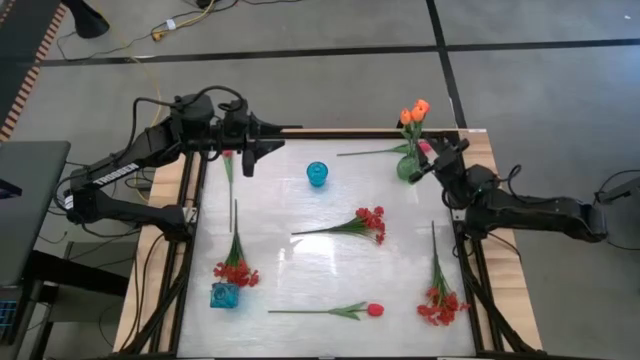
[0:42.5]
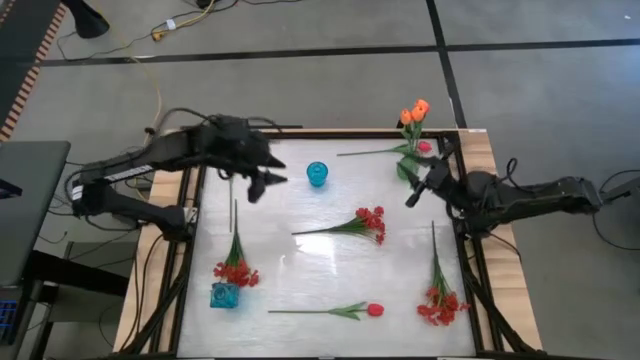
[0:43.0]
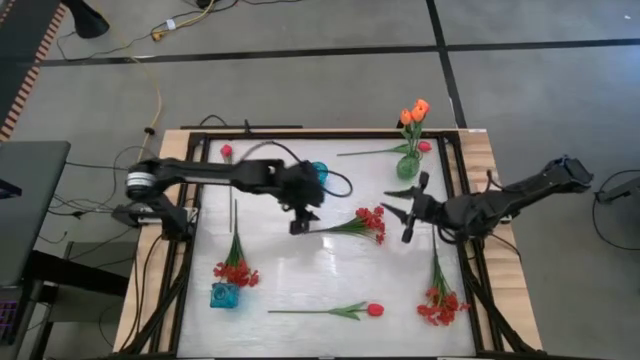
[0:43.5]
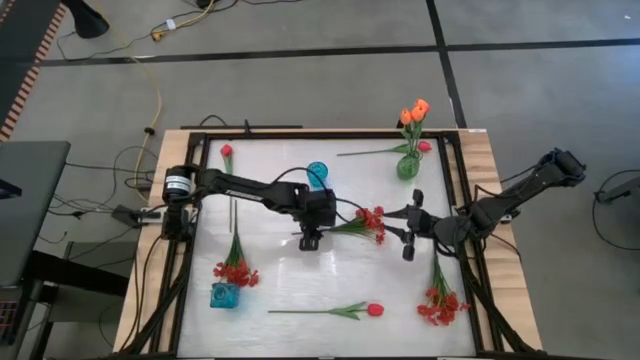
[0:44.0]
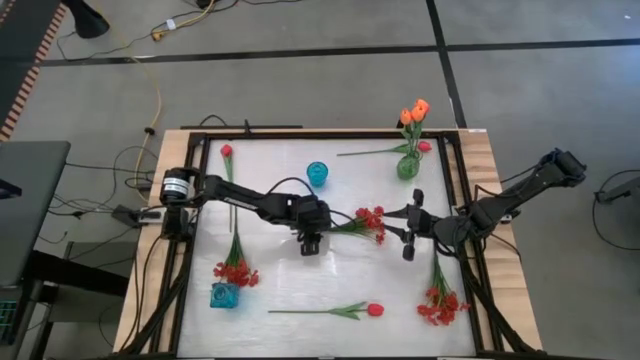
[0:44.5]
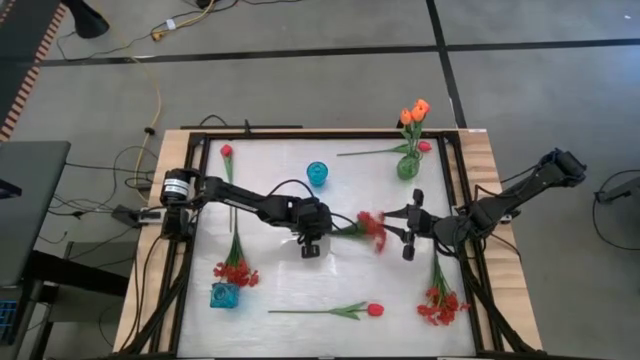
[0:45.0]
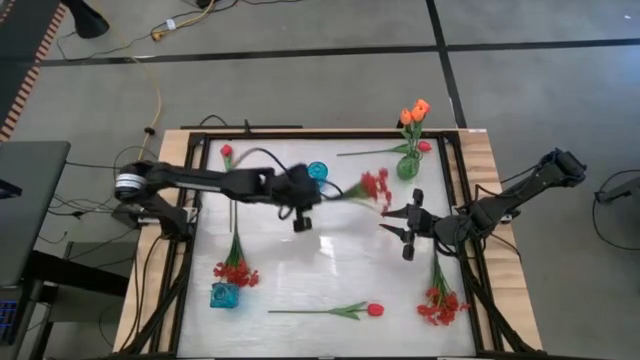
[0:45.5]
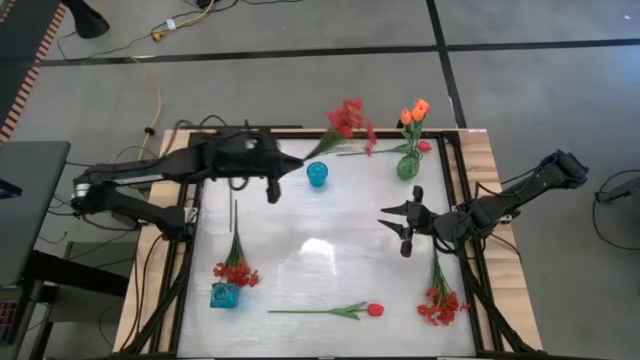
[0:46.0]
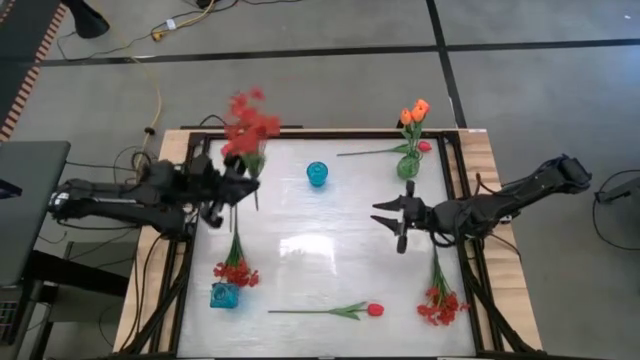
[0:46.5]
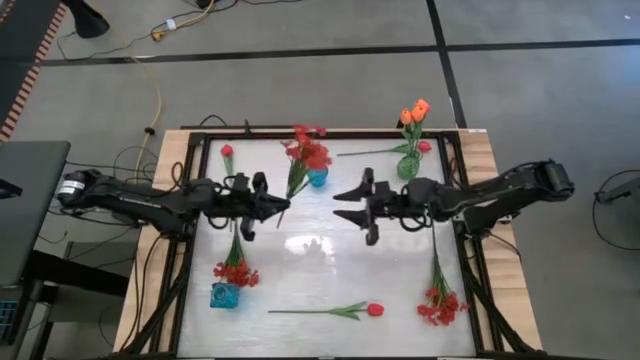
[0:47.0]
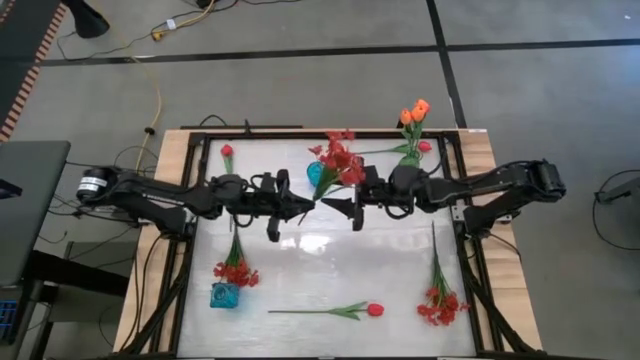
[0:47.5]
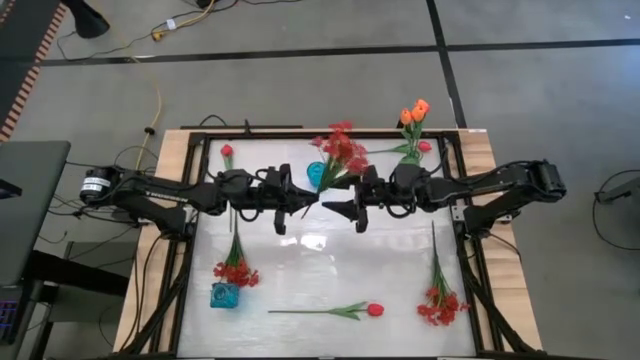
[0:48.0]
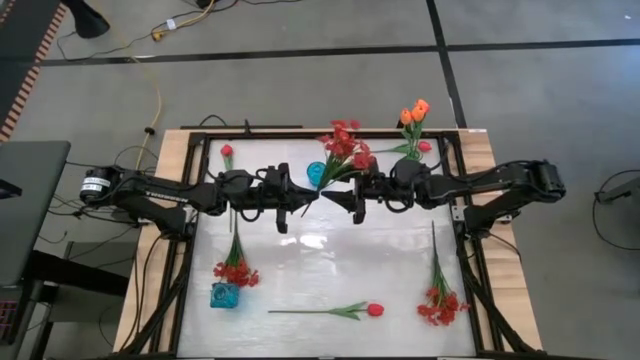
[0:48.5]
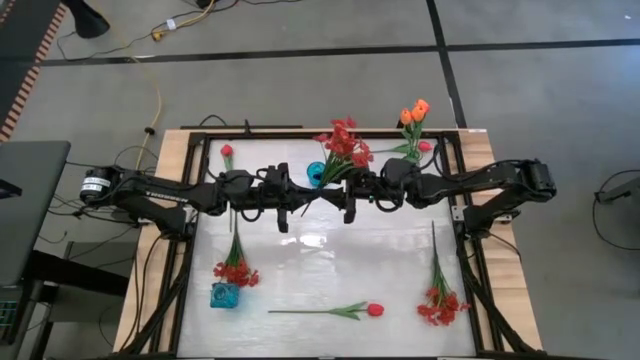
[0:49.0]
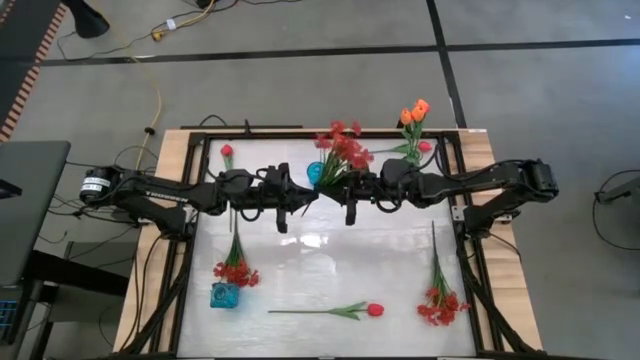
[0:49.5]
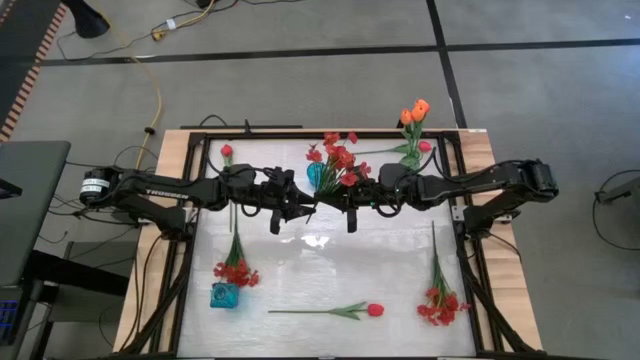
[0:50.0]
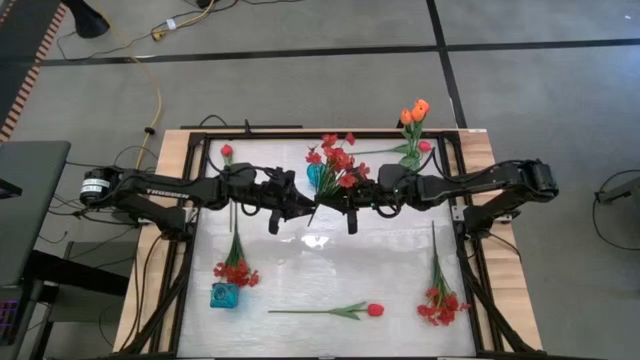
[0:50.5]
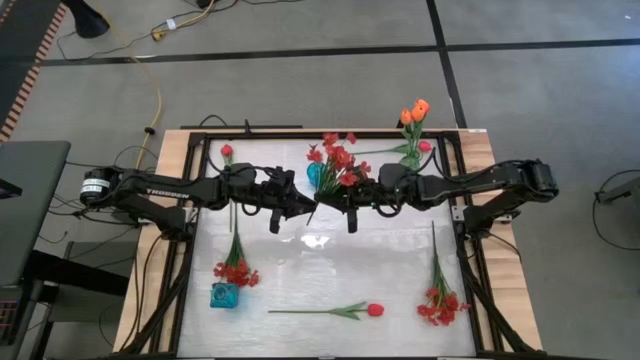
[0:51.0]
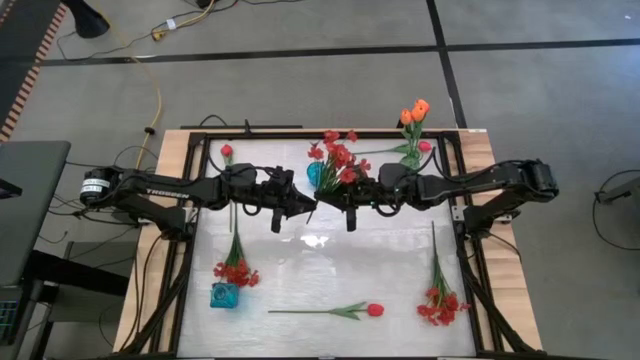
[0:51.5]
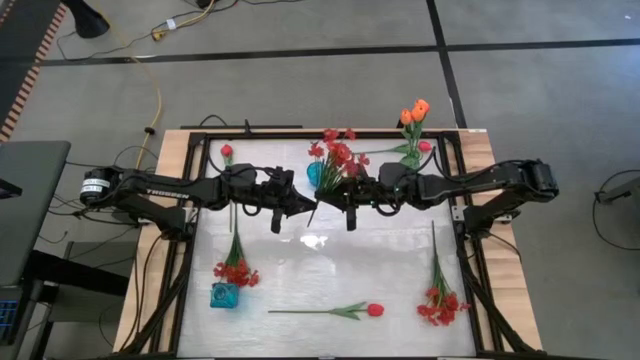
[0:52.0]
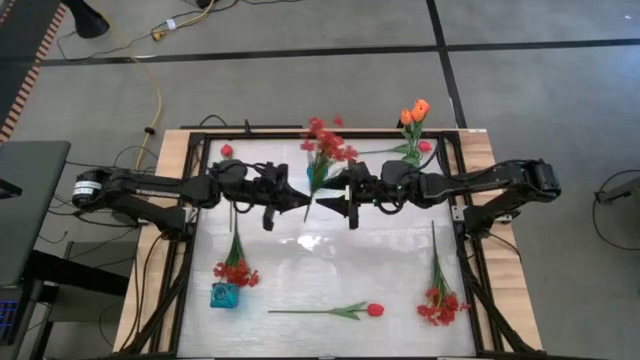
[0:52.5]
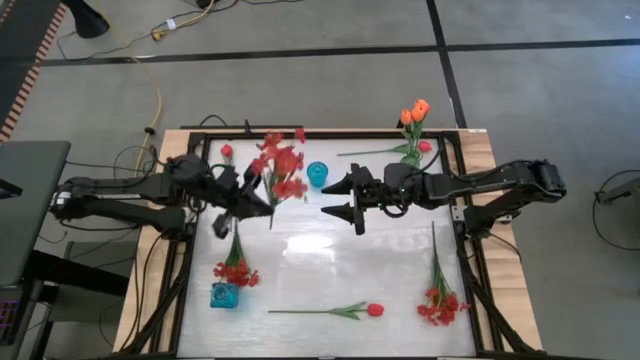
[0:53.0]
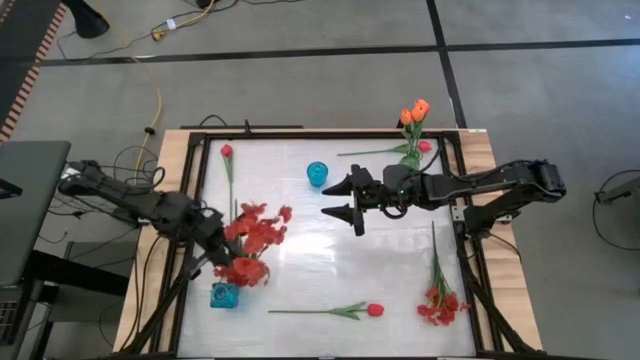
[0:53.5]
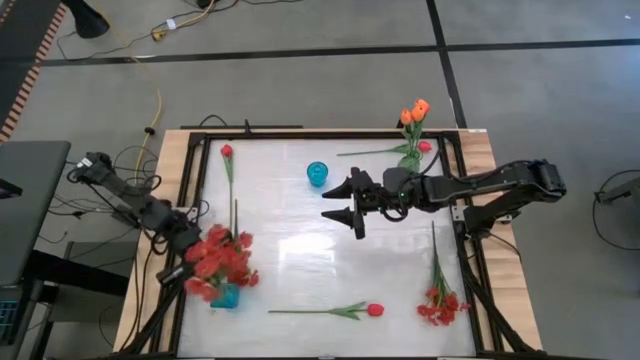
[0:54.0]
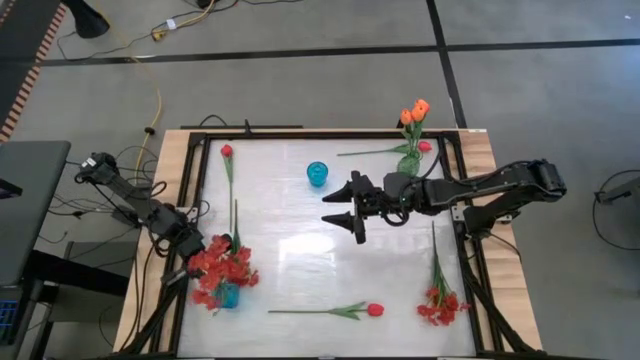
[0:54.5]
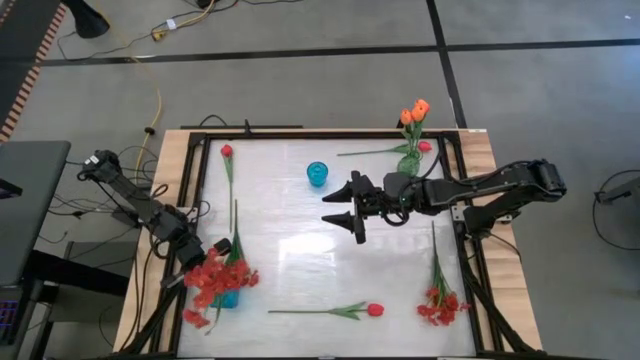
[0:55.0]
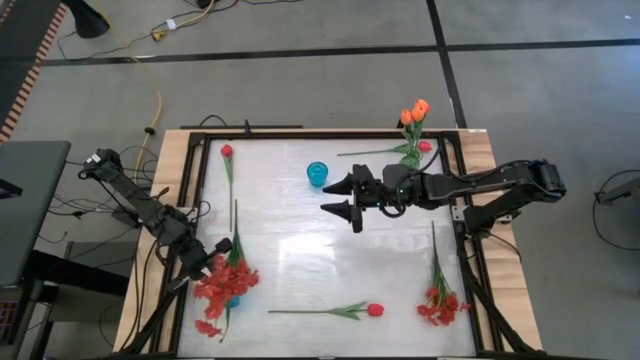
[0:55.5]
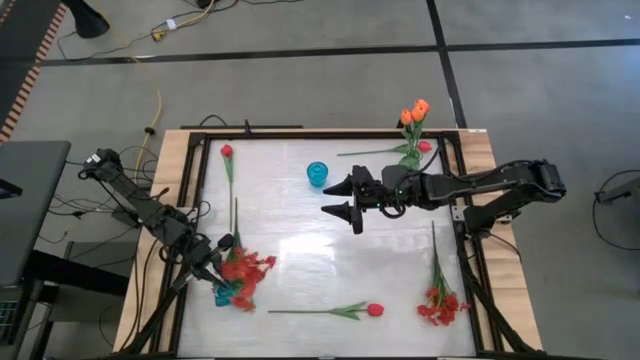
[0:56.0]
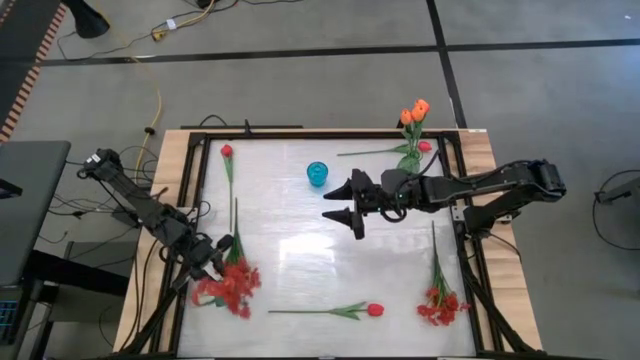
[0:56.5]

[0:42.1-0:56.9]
Task: Sort flowers into vase by color
Put the middle red flowers into the bottom blue vase

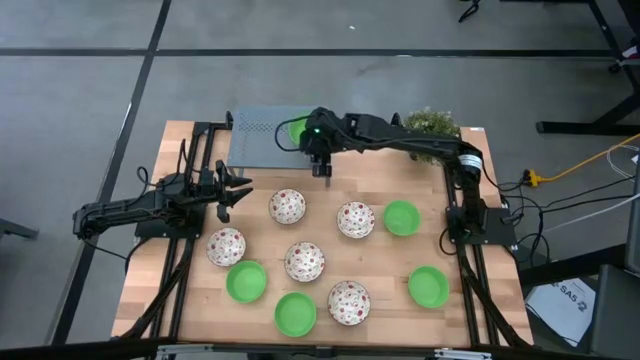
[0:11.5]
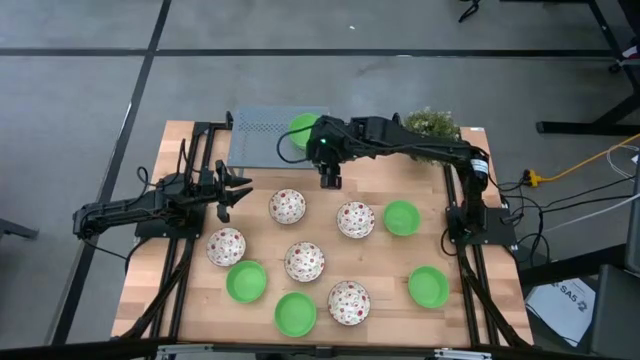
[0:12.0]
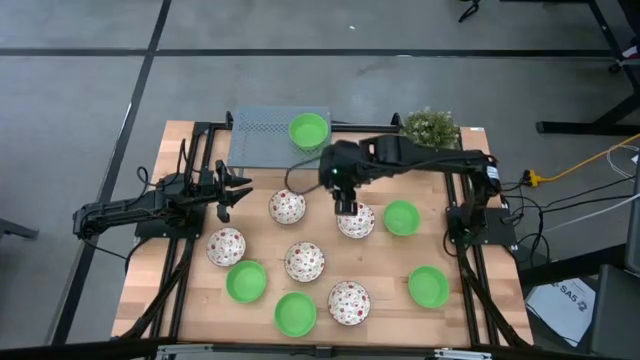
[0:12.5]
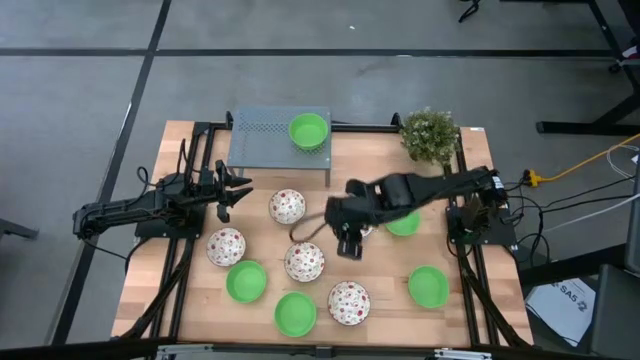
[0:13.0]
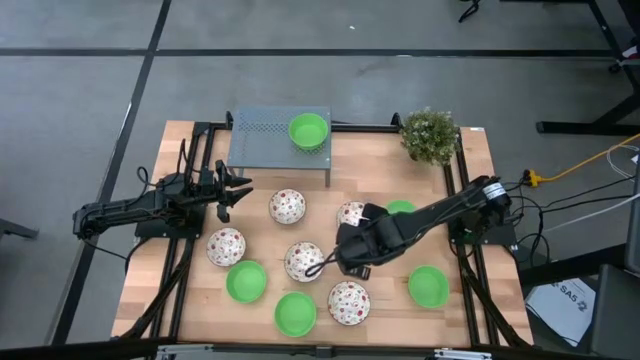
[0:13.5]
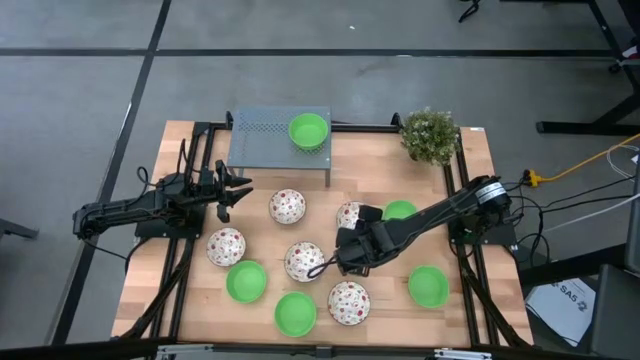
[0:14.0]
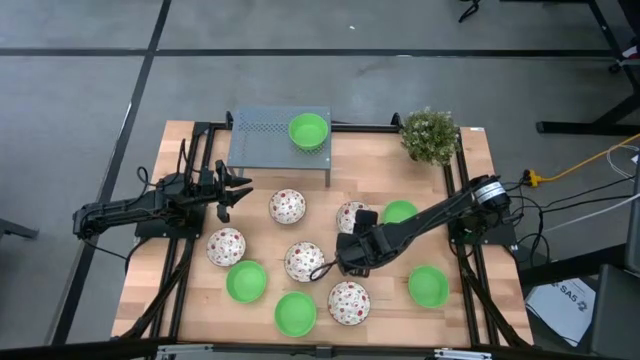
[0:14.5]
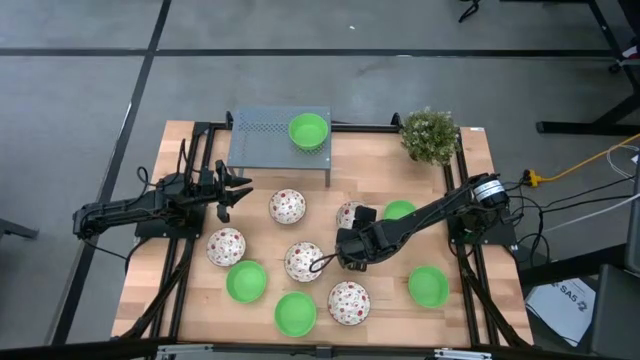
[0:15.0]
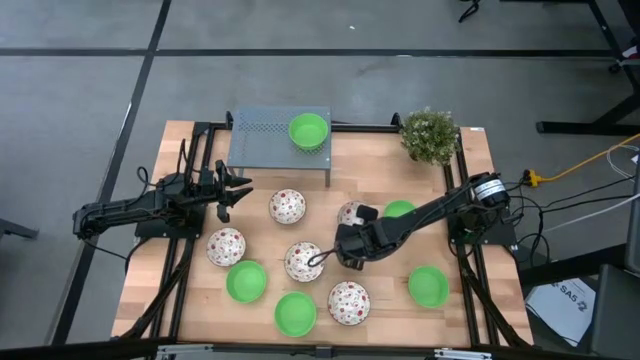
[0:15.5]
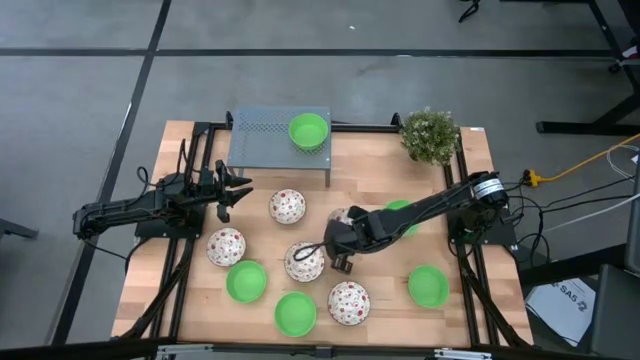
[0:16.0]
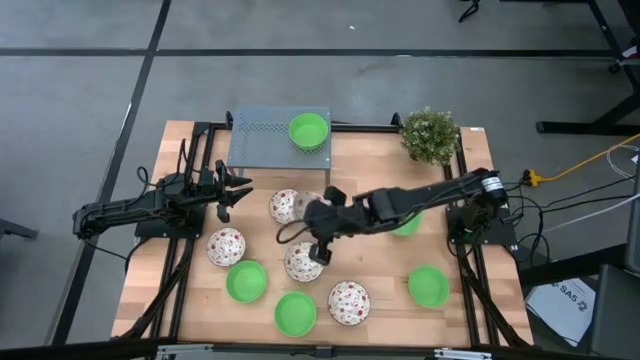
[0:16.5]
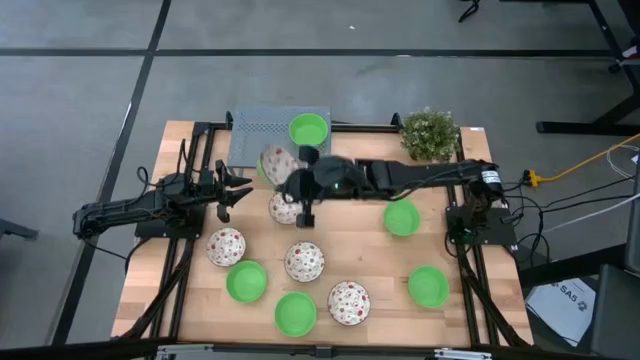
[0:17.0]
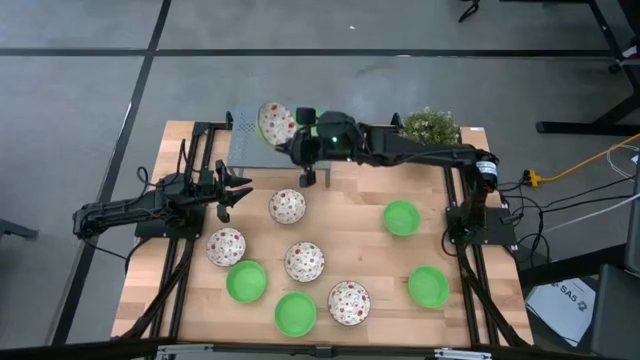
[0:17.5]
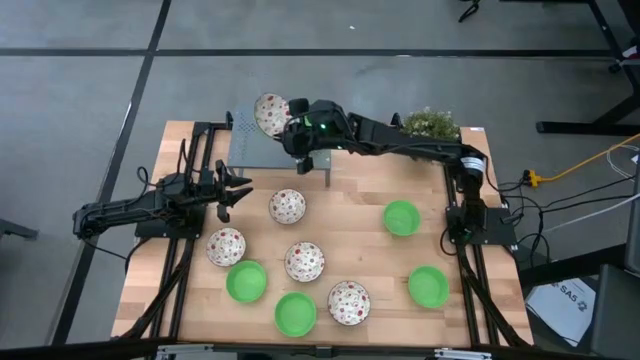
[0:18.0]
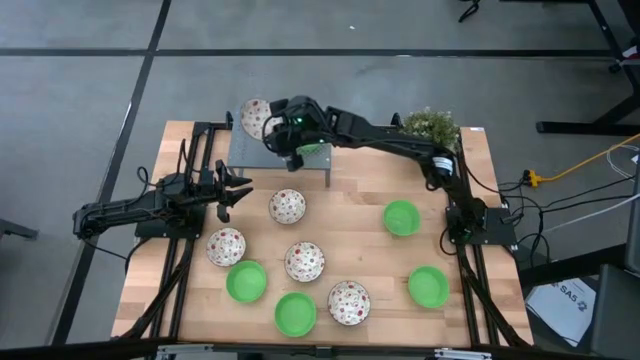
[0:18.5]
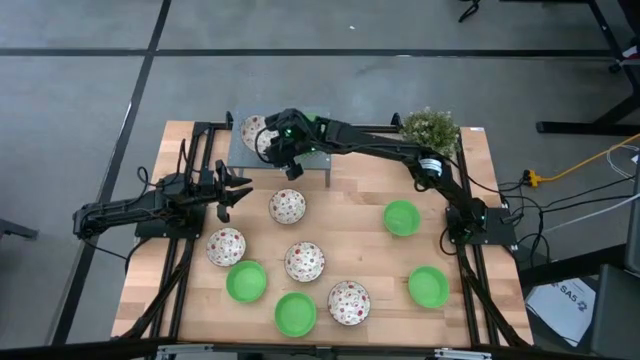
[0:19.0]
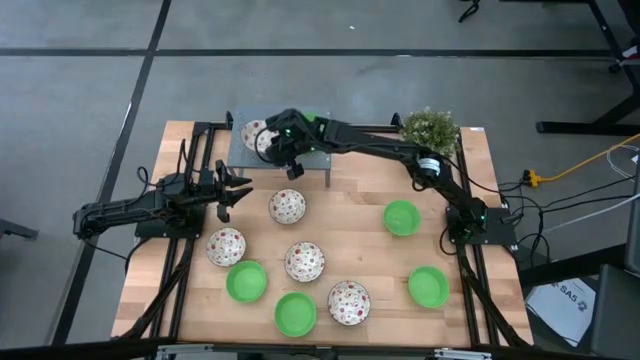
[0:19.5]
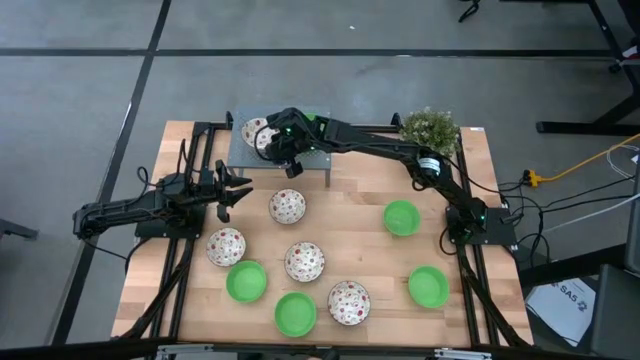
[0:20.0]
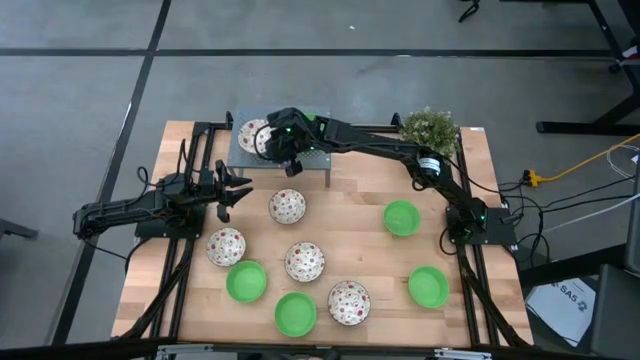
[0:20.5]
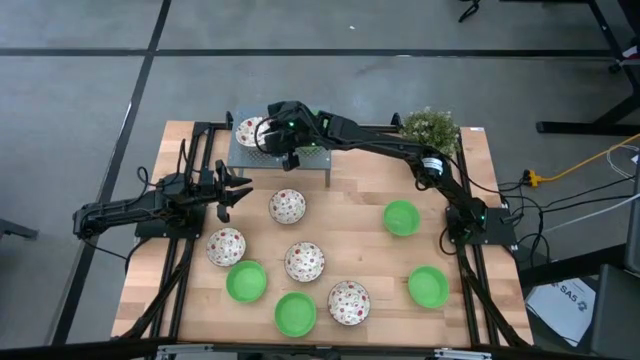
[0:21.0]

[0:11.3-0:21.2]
Task: Pick & Place Mini bowls
Put the white bowl on the shelf
